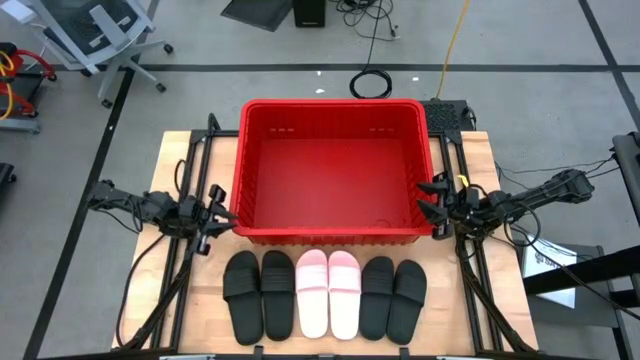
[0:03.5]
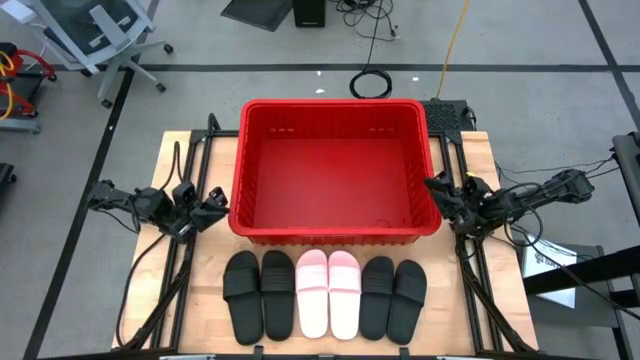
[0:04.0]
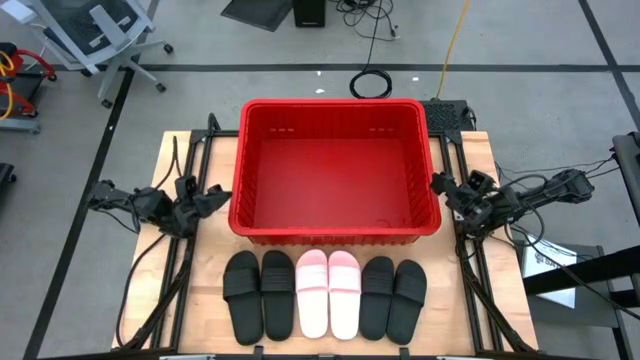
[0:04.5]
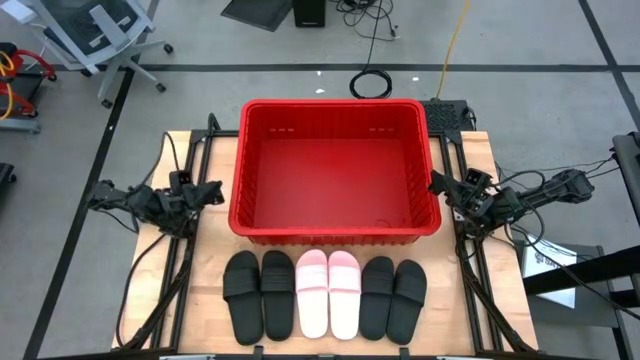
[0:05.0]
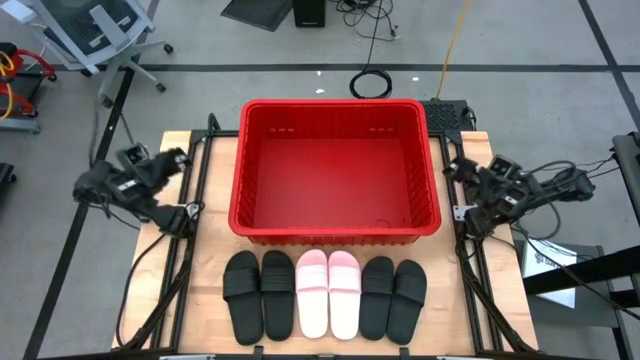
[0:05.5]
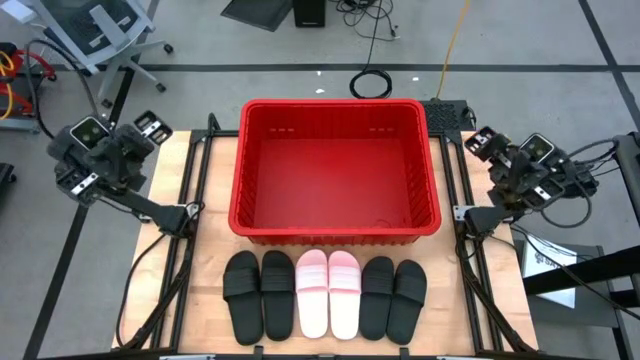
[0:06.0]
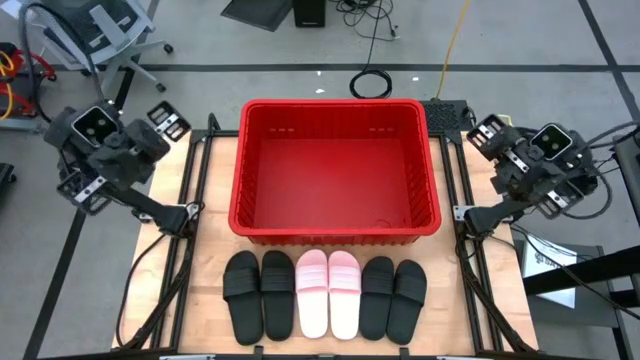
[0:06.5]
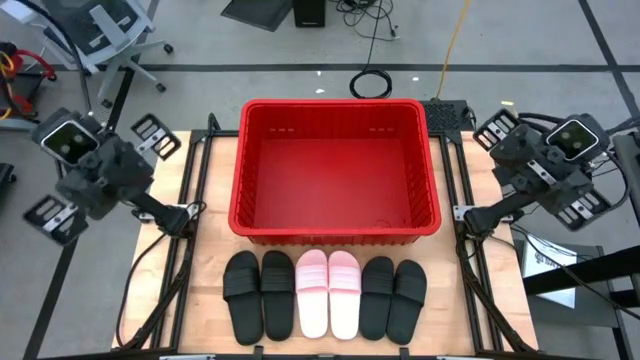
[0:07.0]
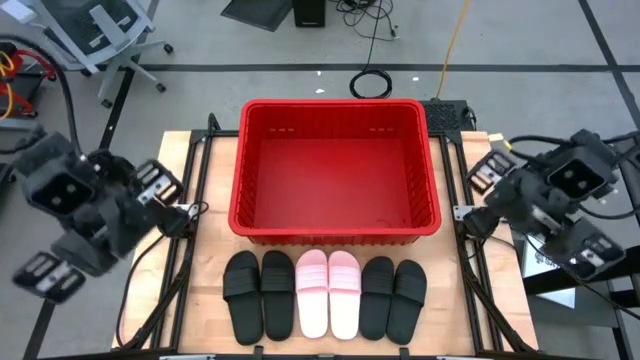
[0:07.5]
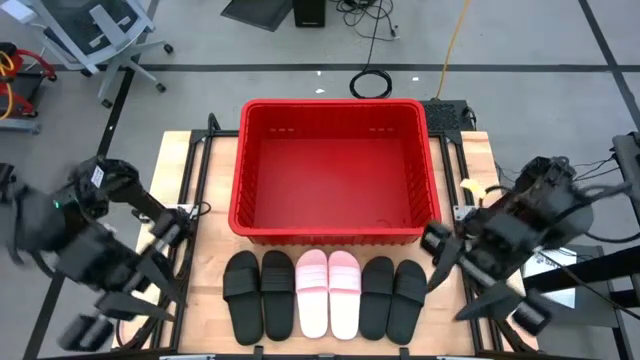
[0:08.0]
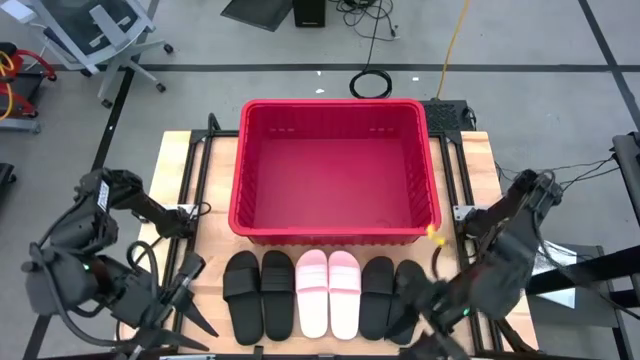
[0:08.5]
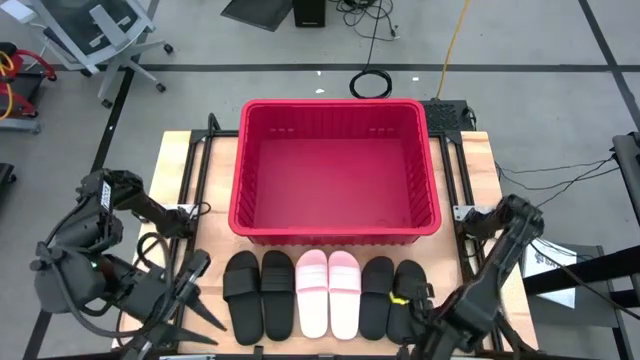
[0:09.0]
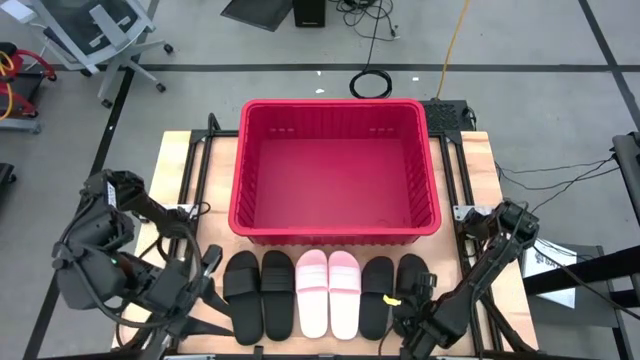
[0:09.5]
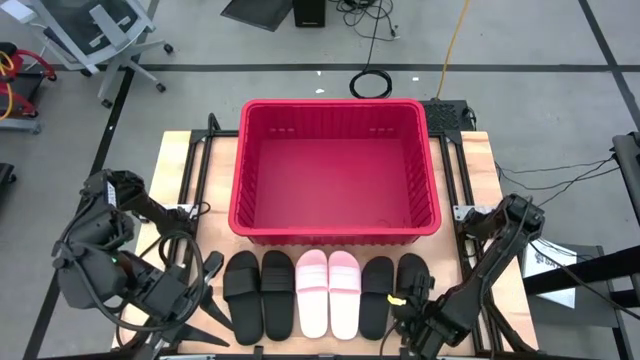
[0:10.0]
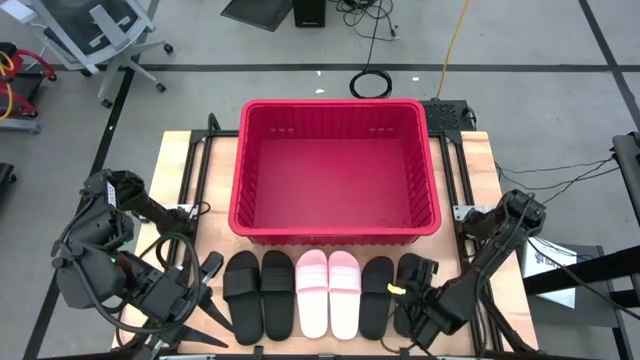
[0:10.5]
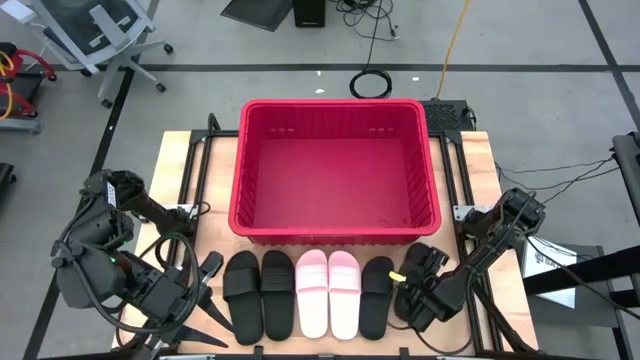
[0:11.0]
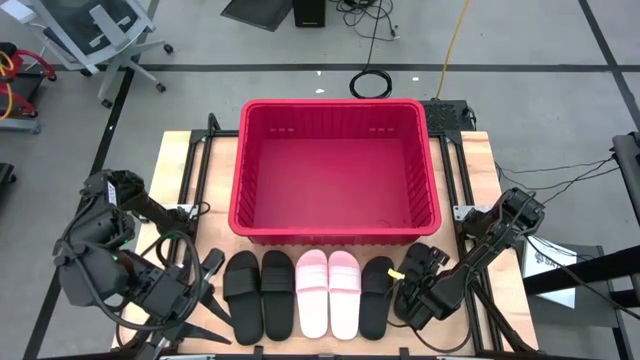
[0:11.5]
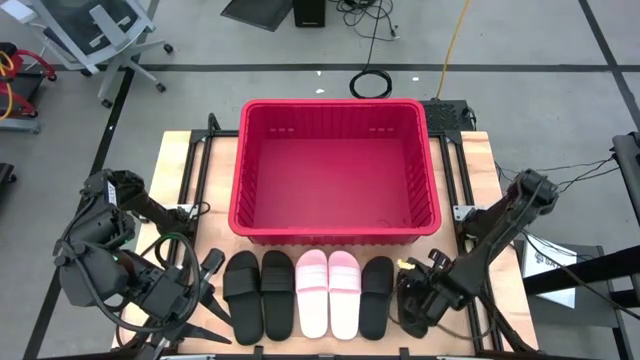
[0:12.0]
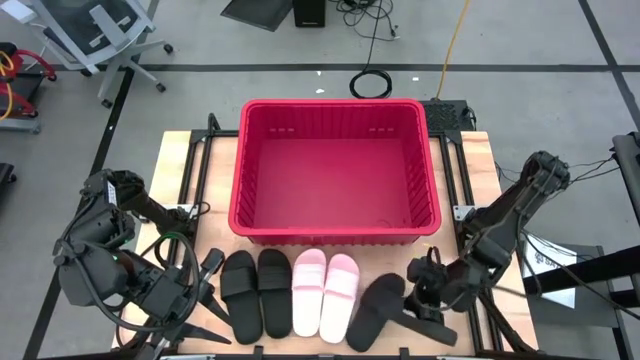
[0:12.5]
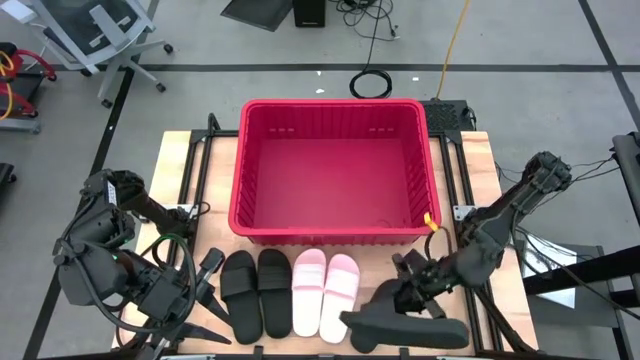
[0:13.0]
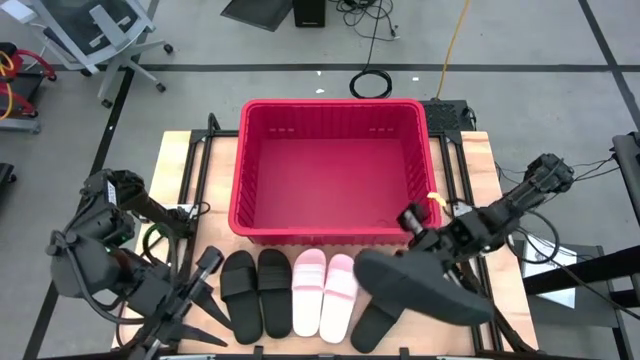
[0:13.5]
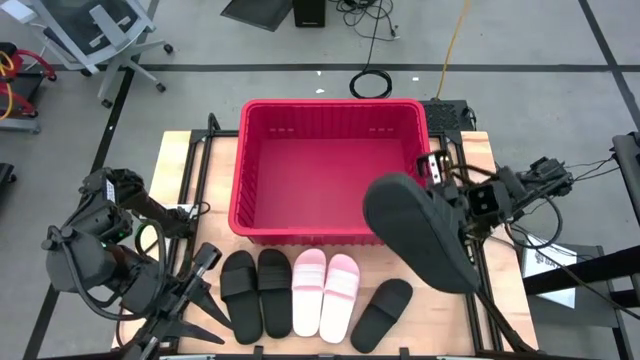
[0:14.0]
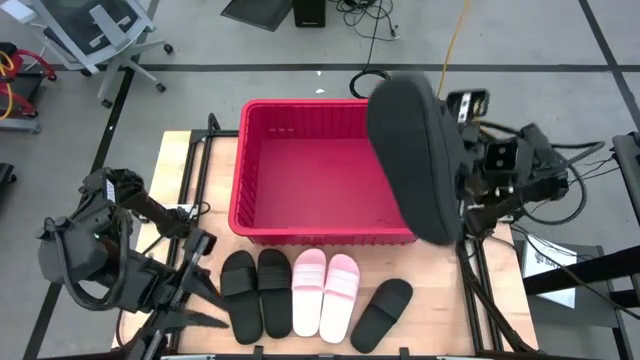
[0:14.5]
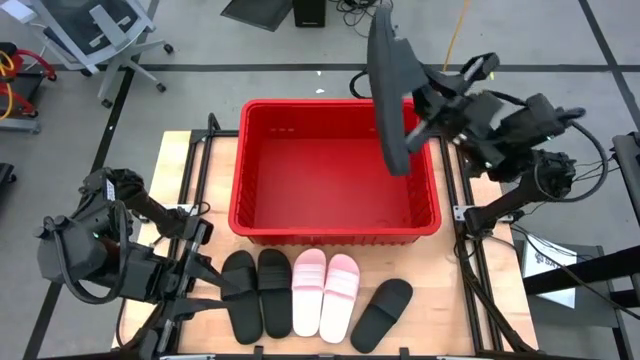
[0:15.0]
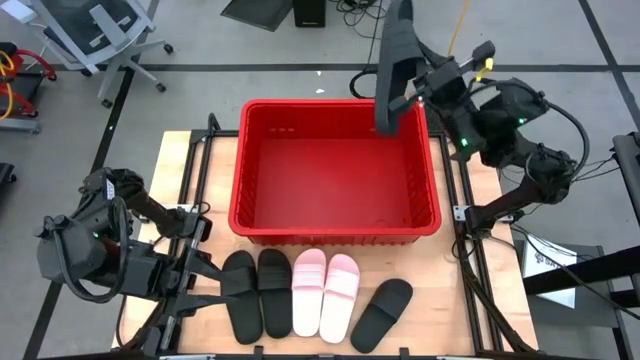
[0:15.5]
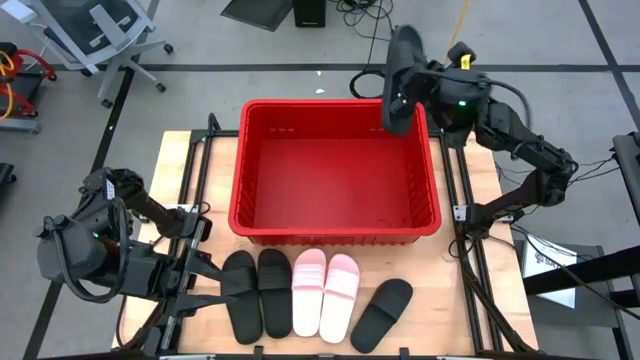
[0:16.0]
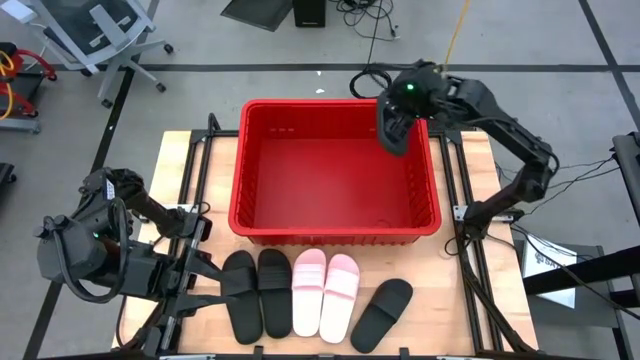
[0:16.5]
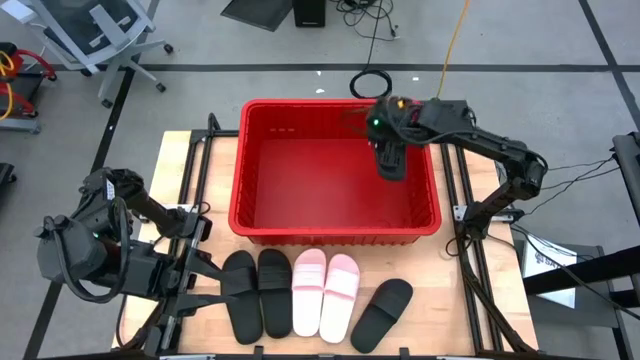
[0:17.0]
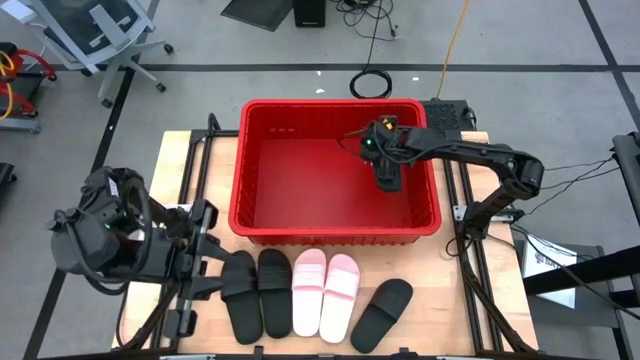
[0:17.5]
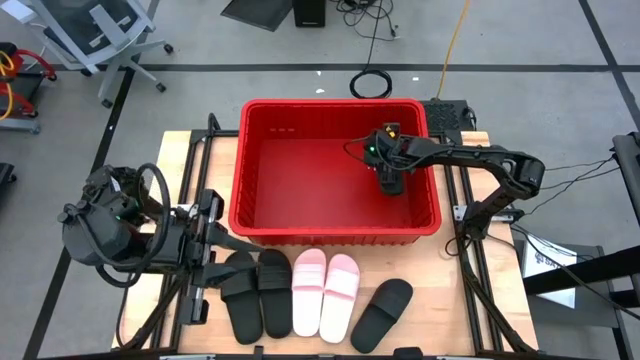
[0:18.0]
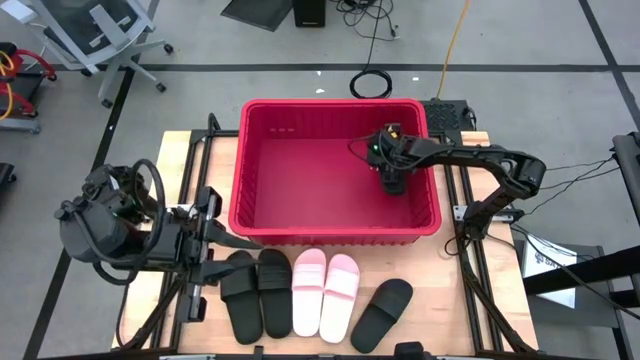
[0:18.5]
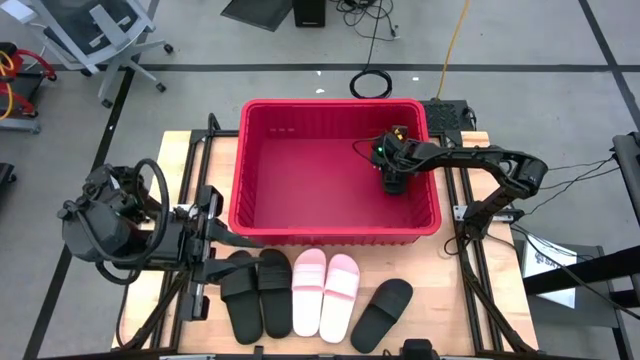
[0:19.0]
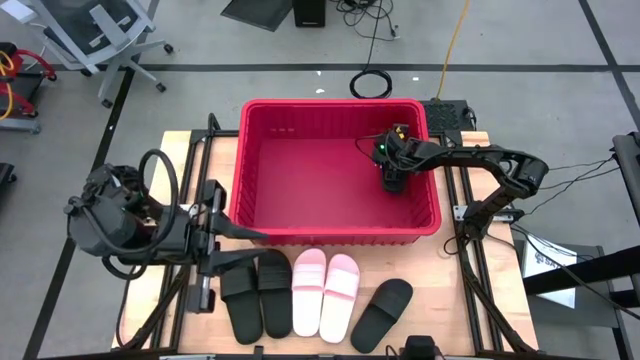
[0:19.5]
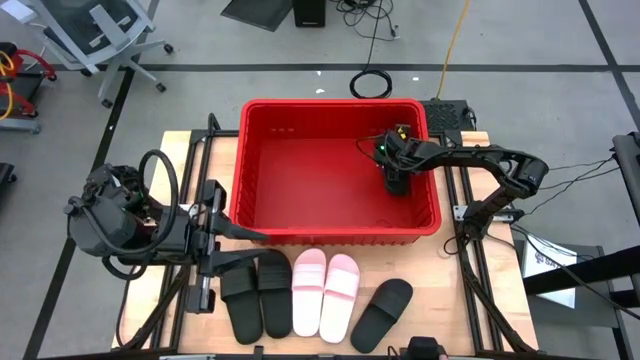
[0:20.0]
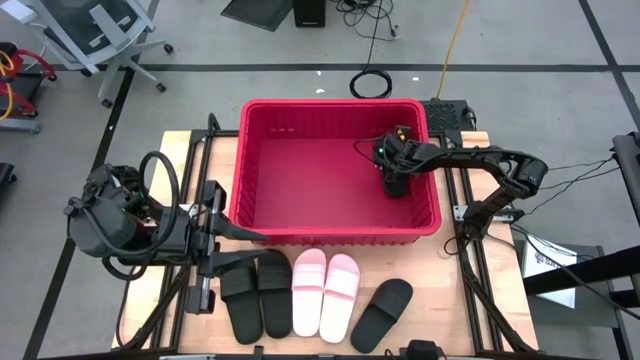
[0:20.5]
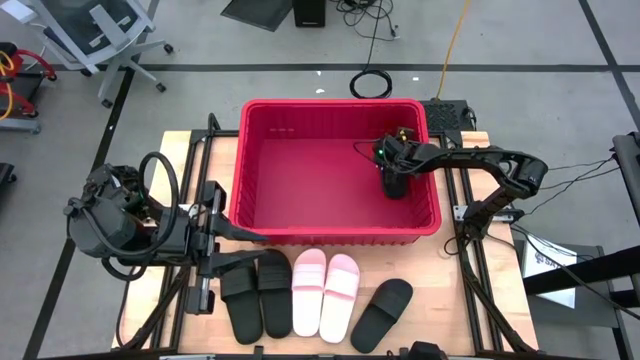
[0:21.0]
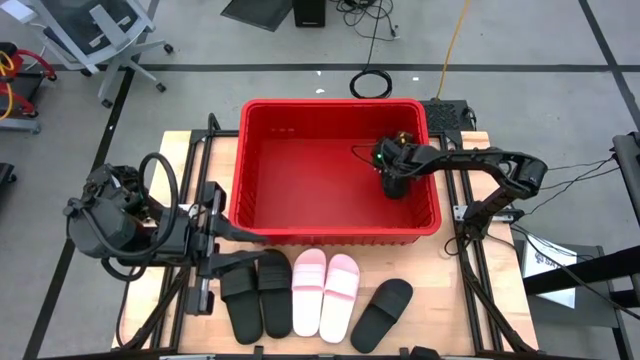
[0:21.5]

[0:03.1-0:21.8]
Task: Pick and place slides into bin
Put the black slide into the red container

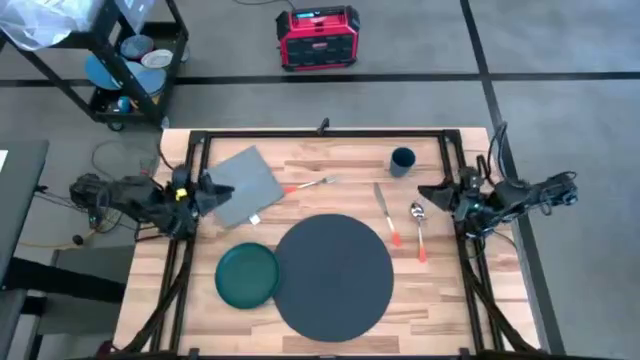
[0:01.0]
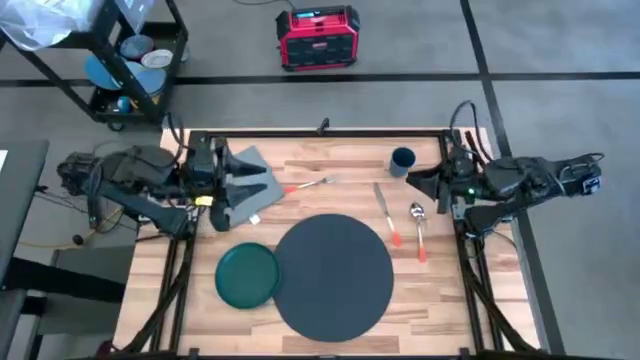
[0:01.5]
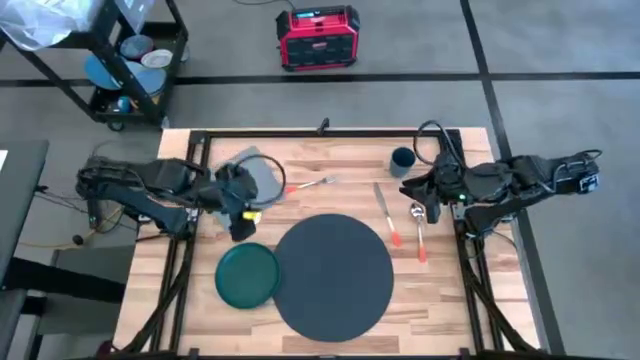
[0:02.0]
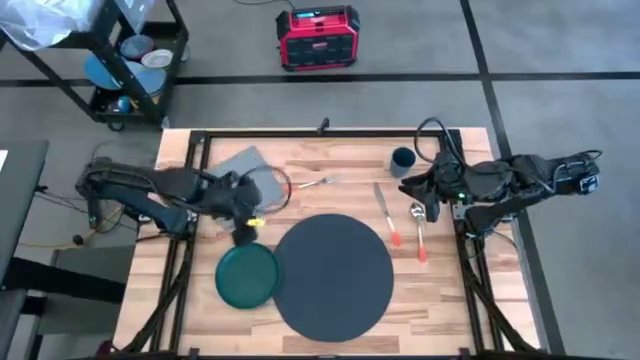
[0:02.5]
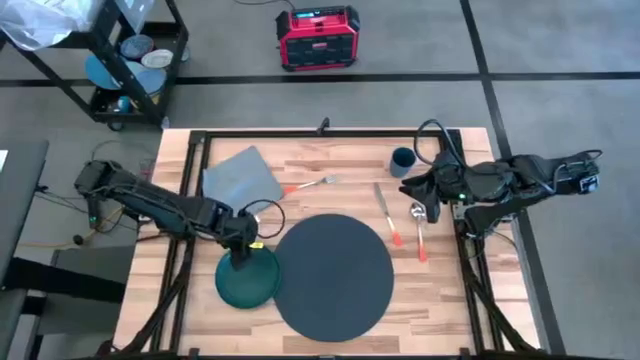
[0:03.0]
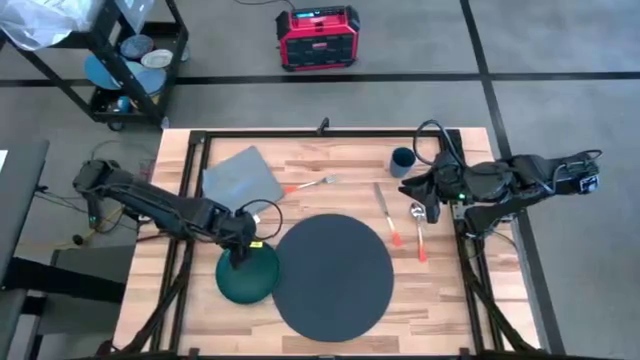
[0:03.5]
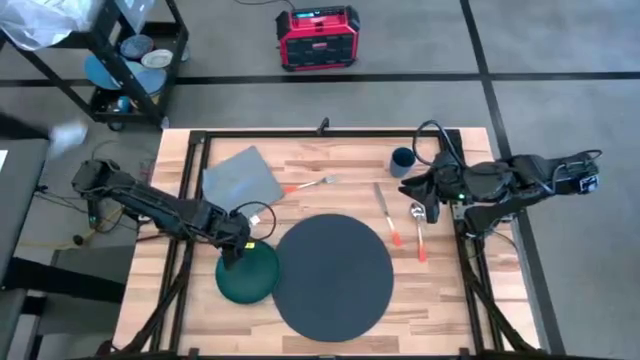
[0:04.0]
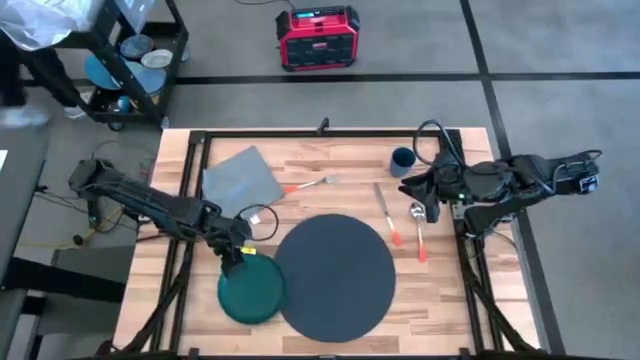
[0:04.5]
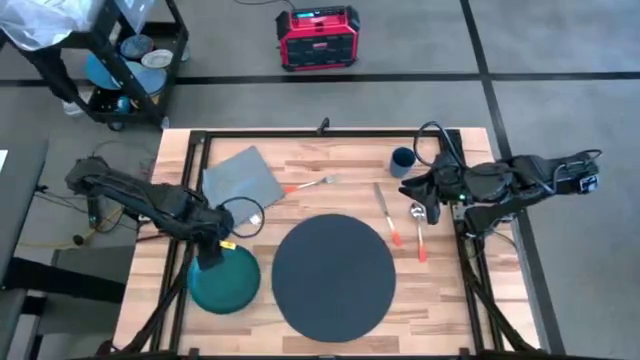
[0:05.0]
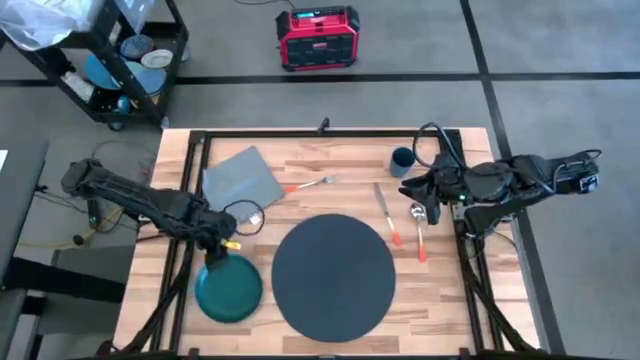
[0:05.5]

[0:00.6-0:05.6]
Task: Set table place
Move the plate to the left of the table
